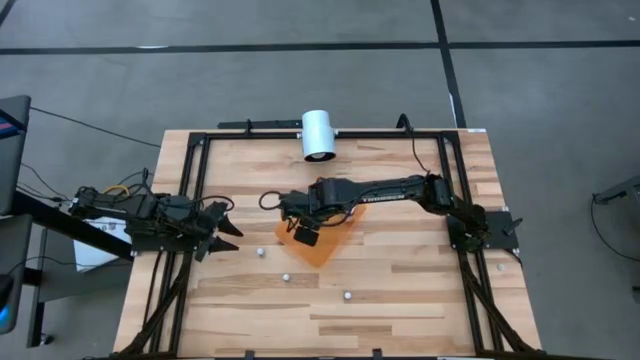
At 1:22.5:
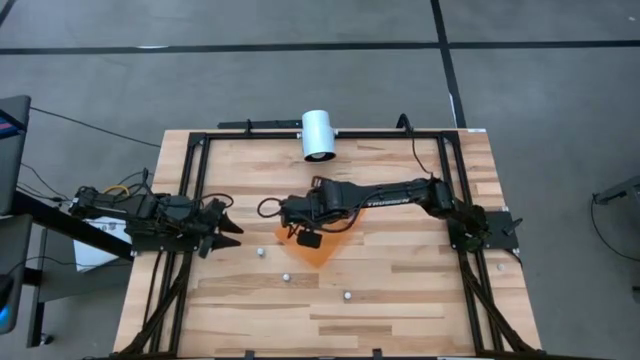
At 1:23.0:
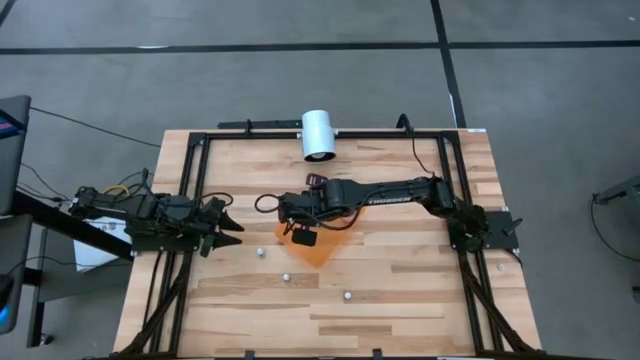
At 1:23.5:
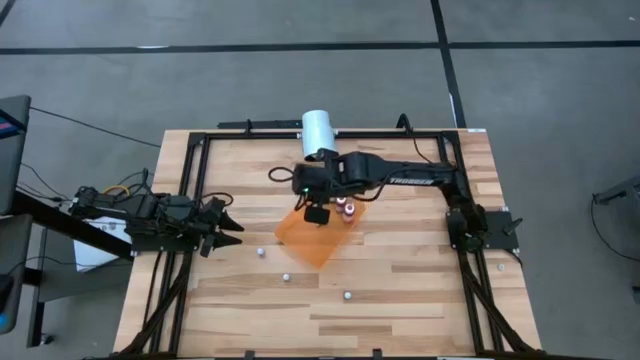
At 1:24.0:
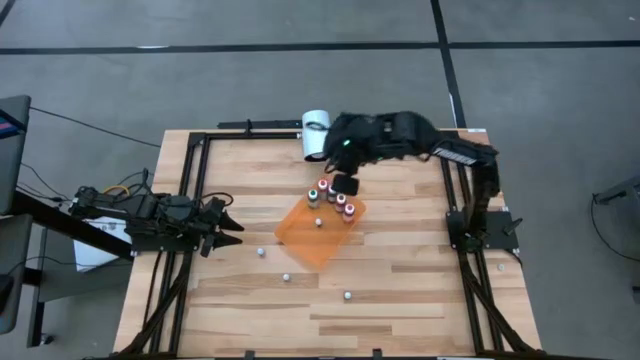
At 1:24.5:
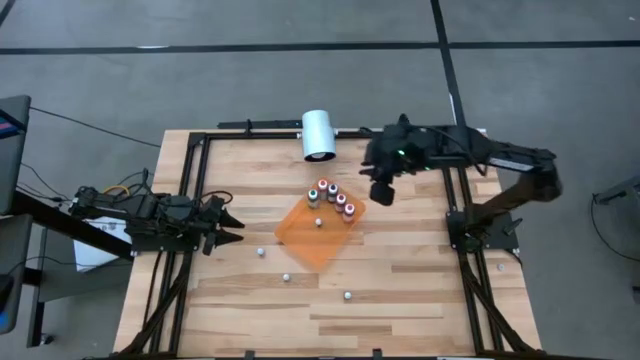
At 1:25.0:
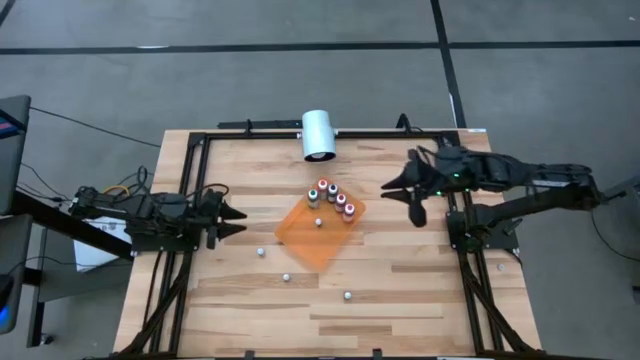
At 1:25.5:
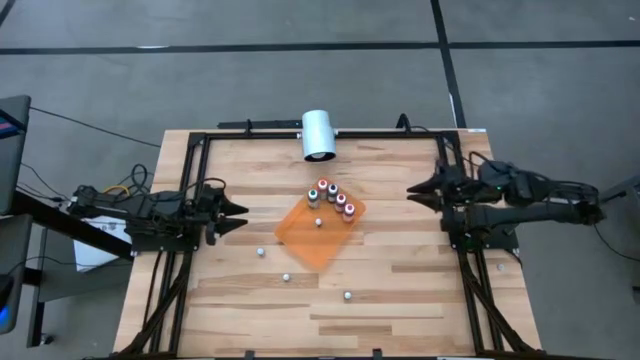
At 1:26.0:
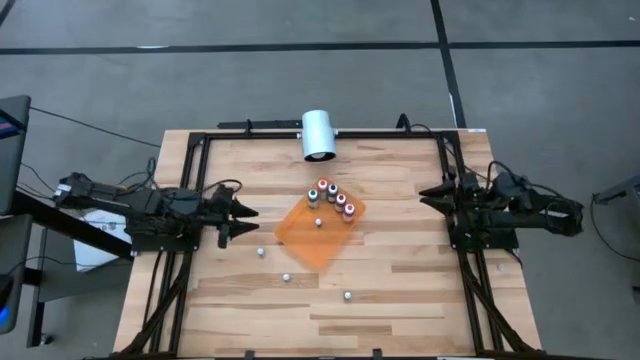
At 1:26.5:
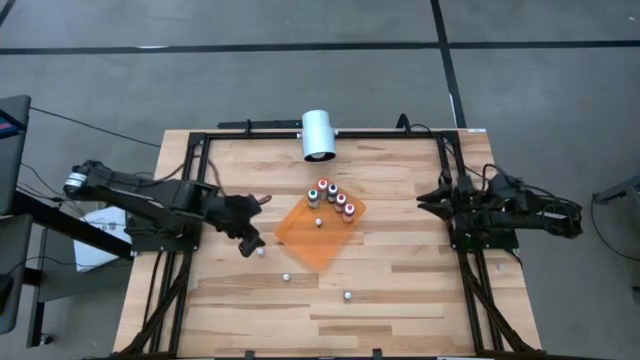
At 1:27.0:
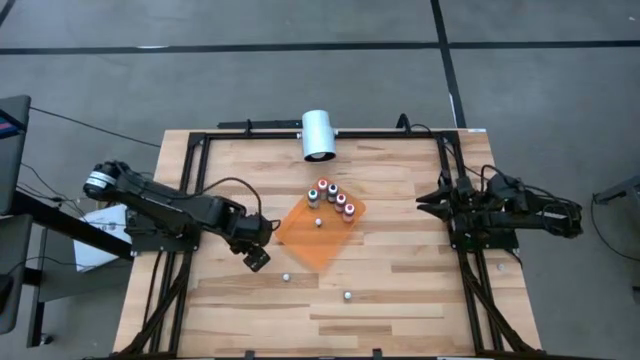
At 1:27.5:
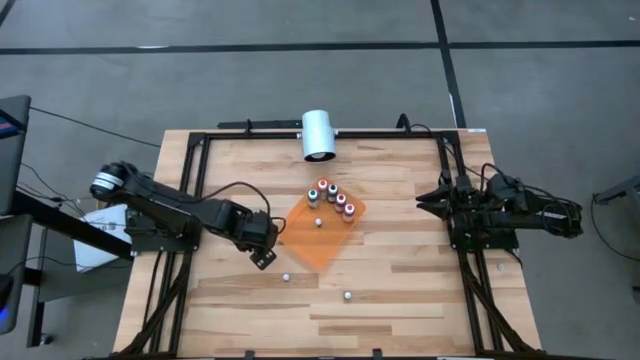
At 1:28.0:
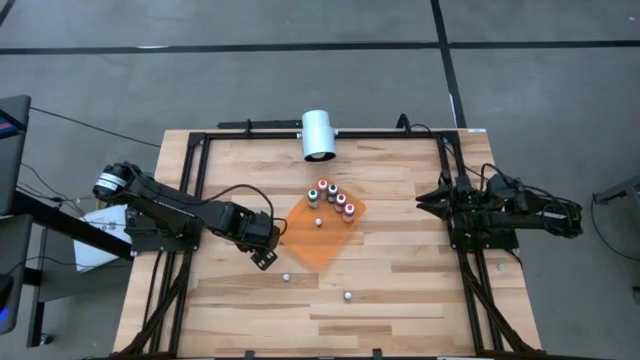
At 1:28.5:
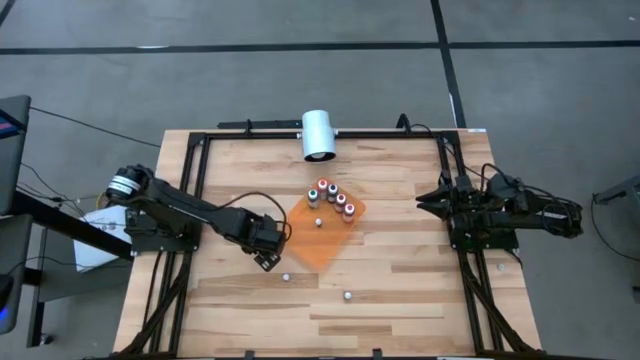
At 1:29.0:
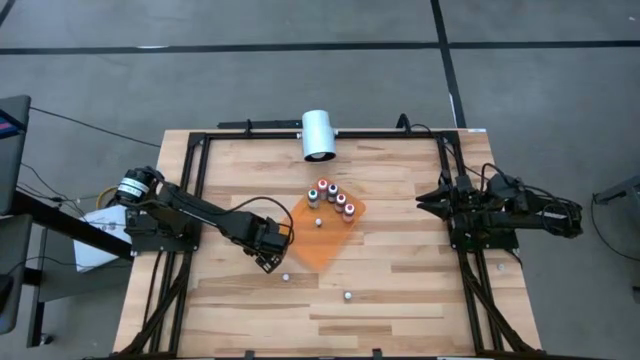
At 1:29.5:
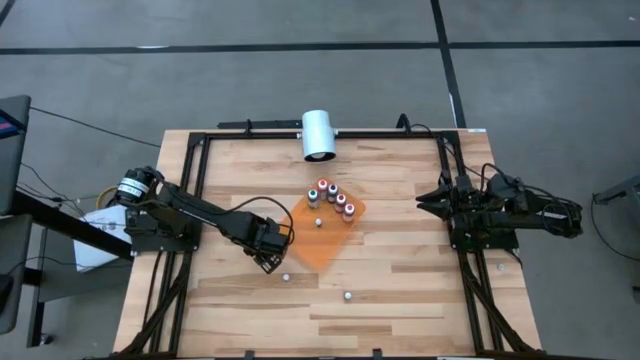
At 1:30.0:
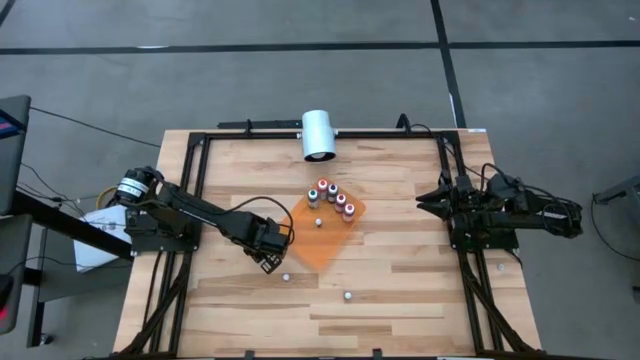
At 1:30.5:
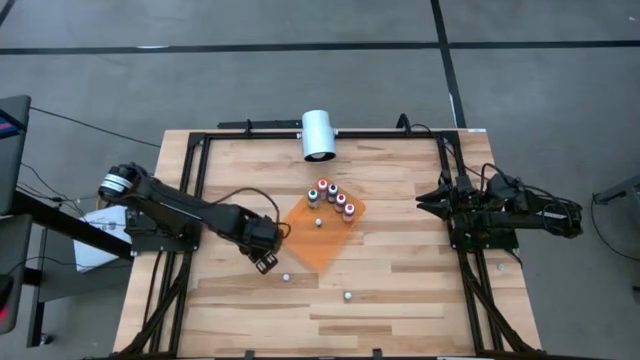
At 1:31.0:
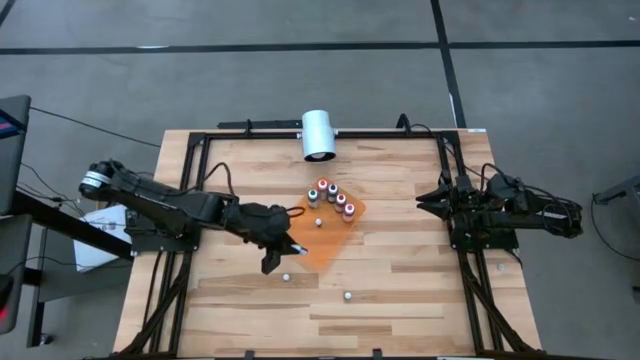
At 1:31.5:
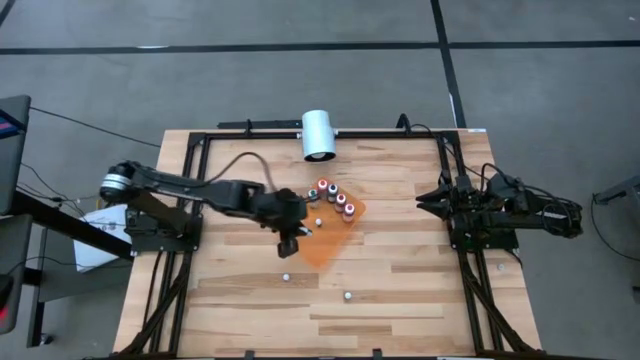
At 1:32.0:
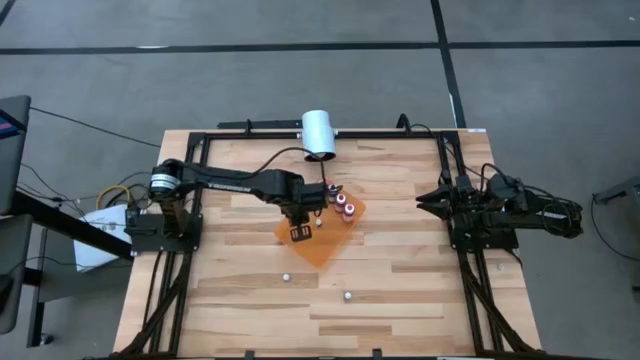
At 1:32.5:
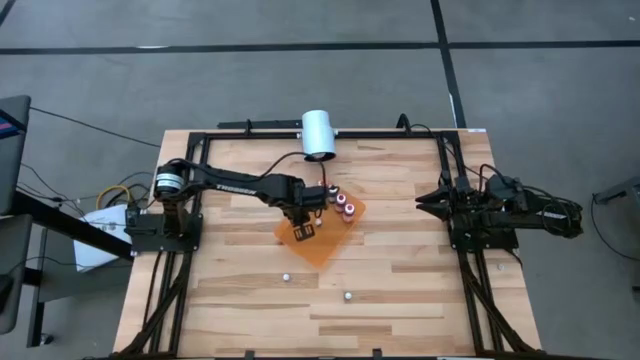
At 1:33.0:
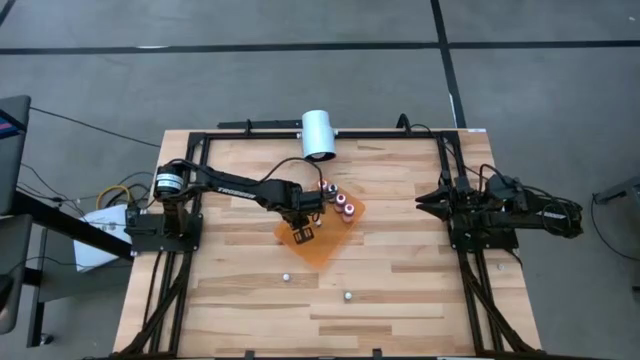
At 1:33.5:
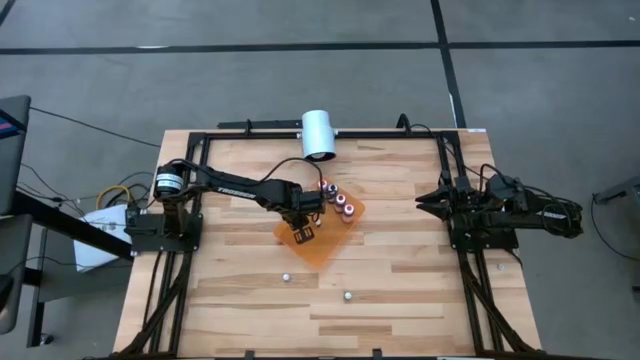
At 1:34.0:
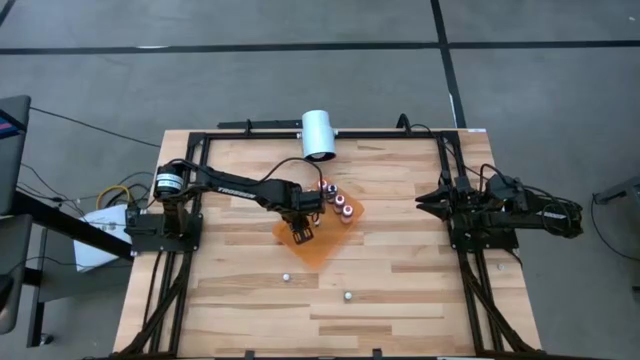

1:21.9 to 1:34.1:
Task: Pick & Place food coloring
Put the small green food coloring bottle into the orange bin

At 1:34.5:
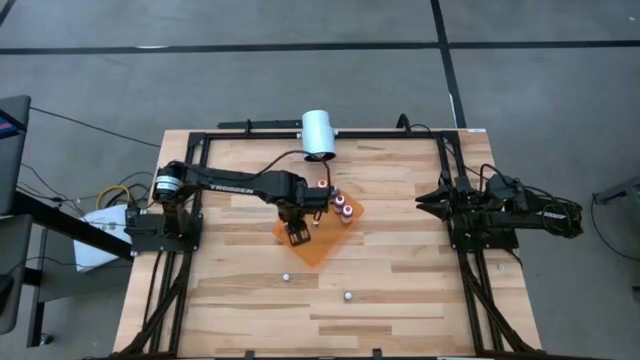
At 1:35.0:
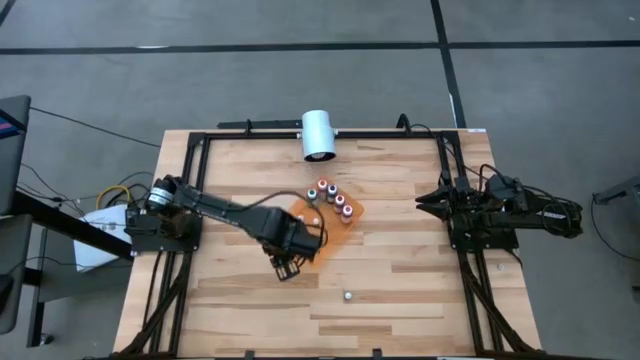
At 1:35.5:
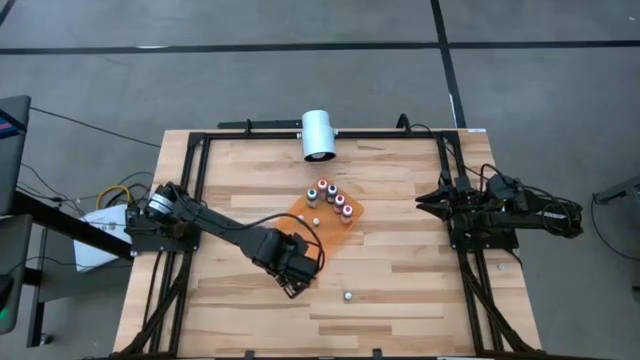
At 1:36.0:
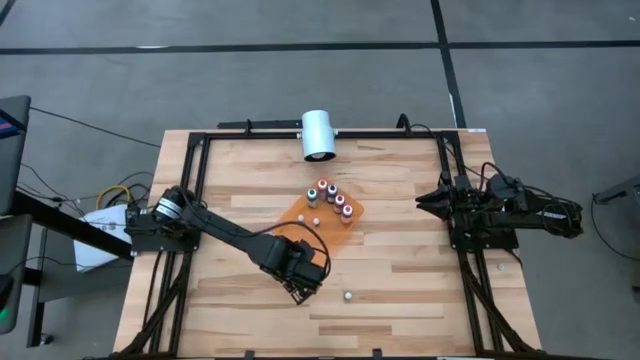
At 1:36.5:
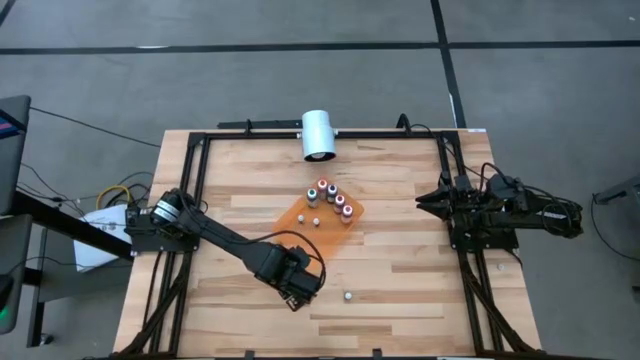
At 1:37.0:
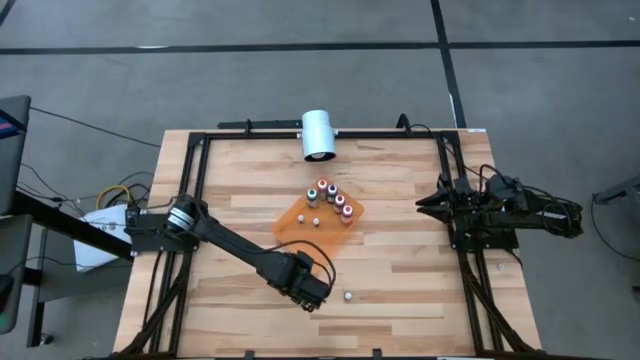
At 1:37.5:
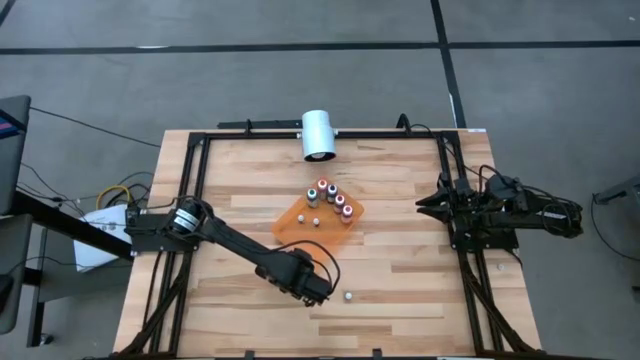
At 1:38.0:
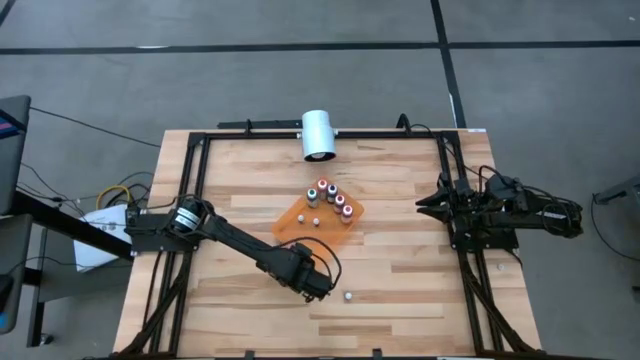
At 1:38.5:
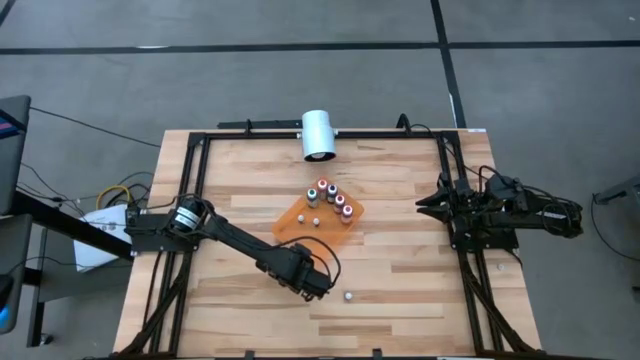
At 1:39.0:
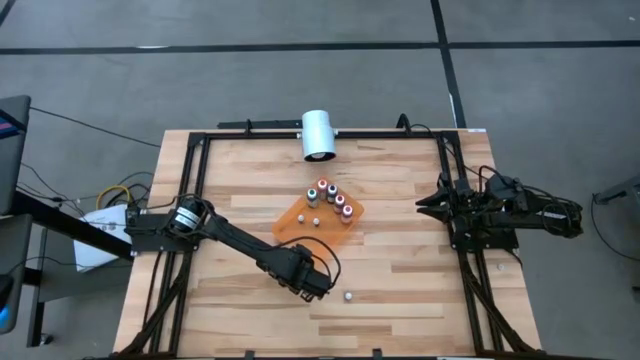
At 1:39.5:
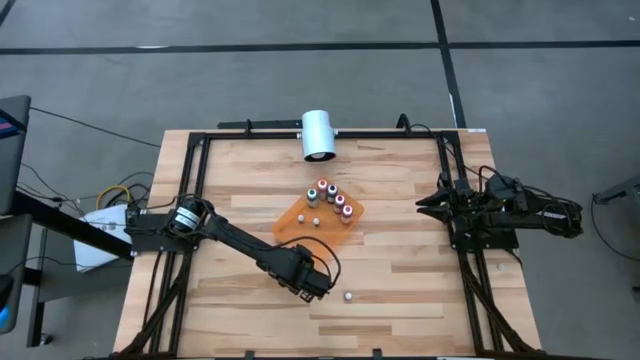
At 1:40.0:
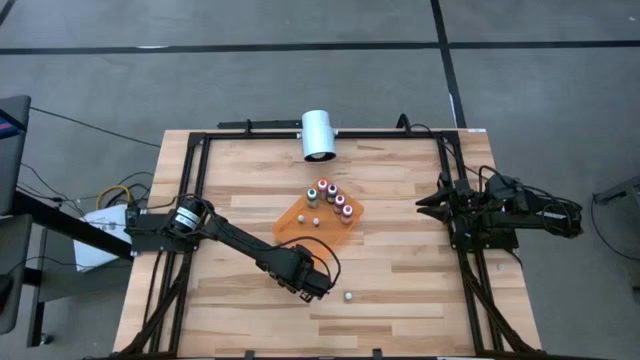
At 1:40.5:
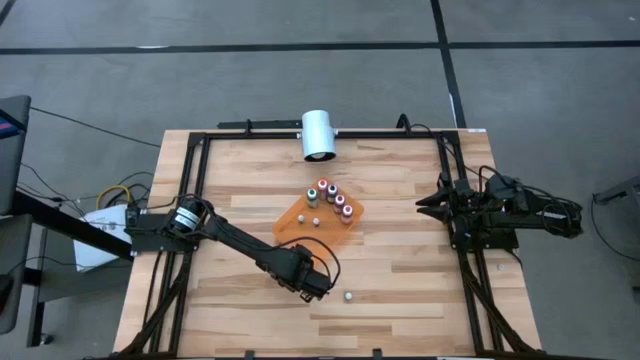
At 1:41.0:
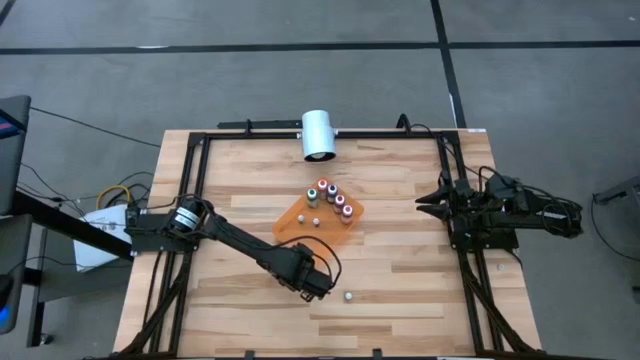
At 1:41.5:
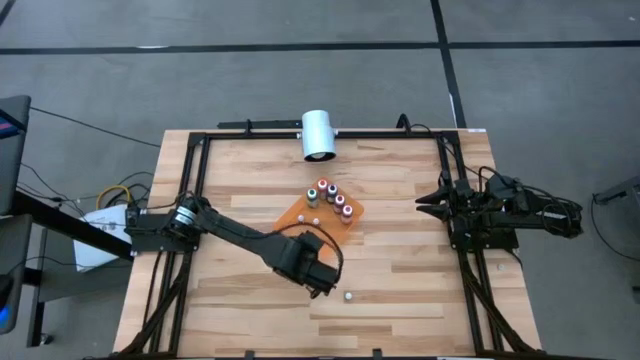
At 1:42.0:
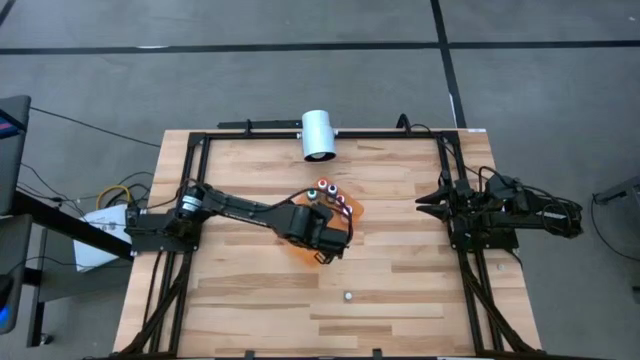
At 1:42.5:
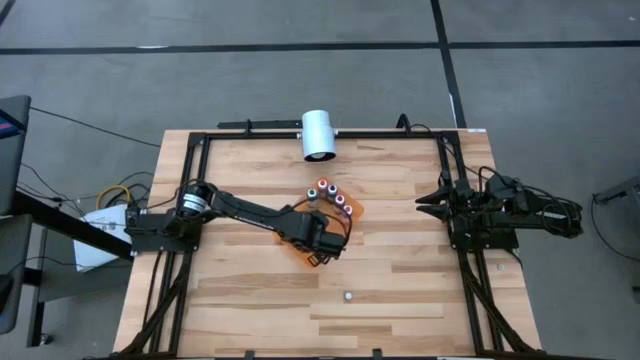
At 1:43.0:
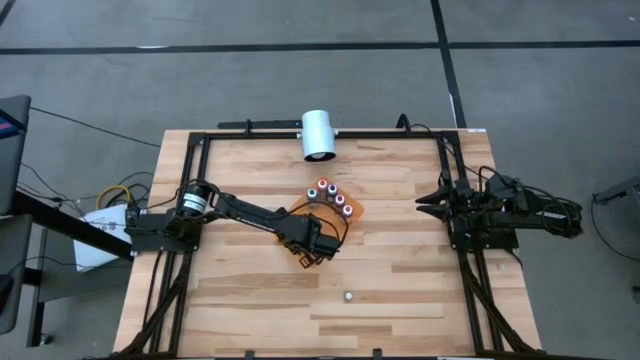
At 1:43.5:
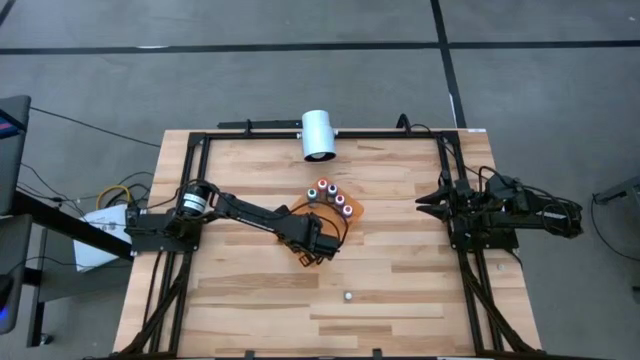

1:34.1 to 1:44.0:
Put the small violet food coloring bottle into the orange bin
